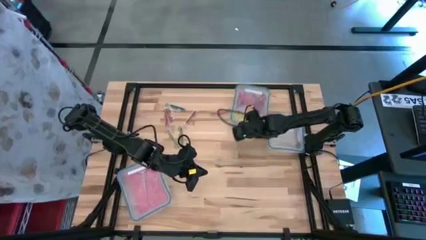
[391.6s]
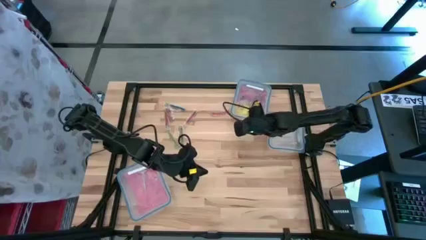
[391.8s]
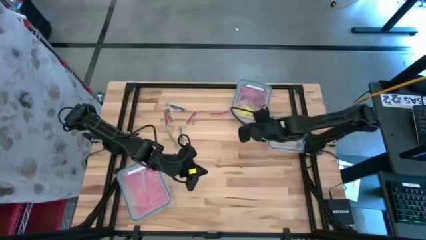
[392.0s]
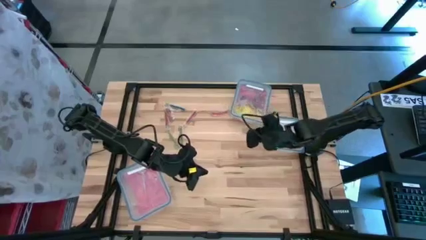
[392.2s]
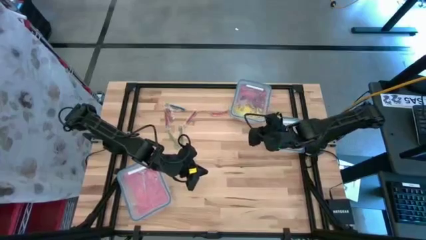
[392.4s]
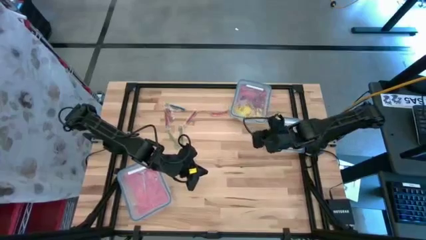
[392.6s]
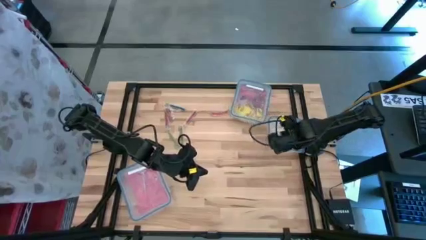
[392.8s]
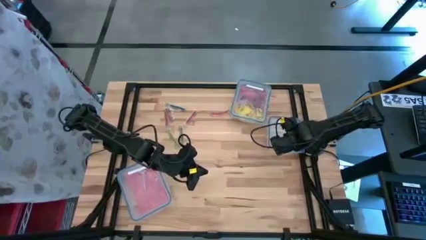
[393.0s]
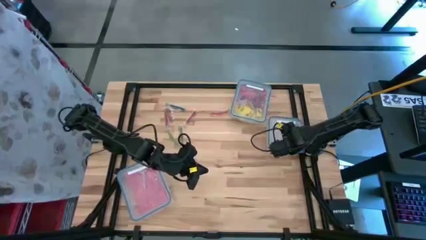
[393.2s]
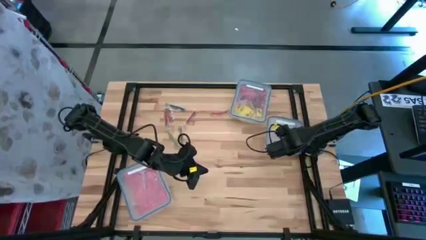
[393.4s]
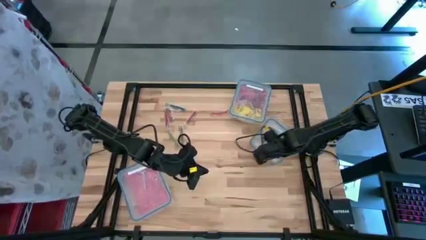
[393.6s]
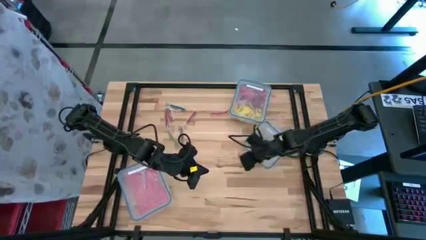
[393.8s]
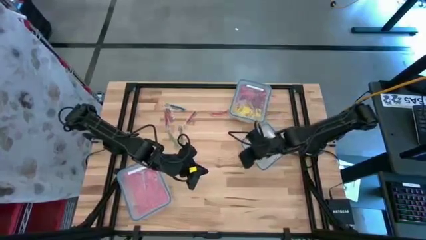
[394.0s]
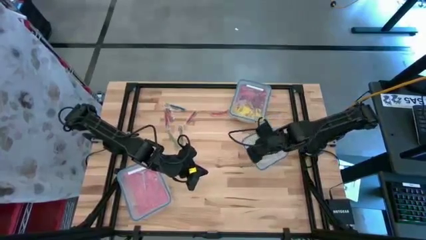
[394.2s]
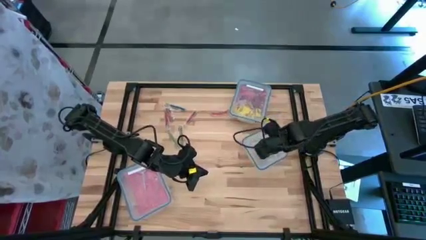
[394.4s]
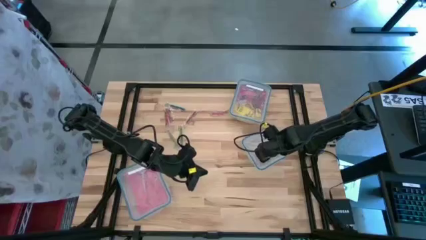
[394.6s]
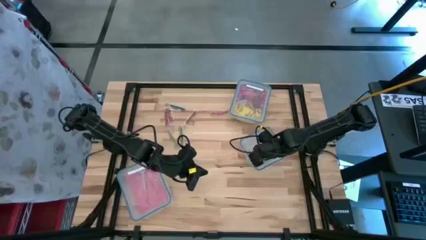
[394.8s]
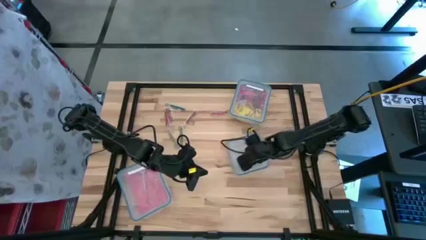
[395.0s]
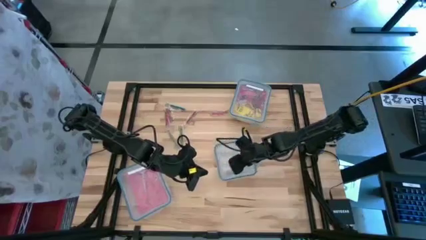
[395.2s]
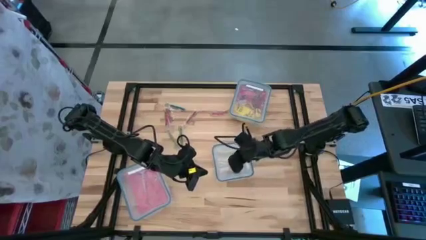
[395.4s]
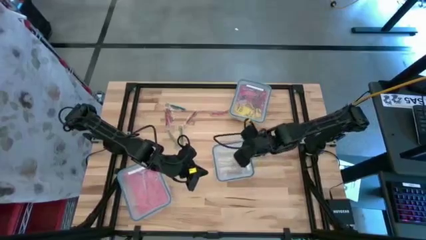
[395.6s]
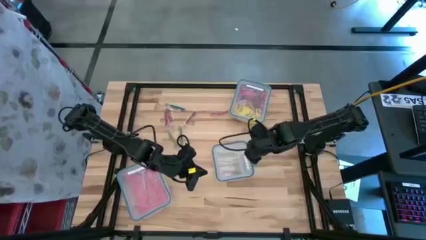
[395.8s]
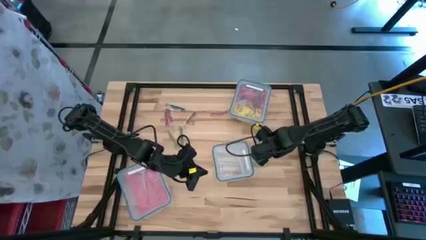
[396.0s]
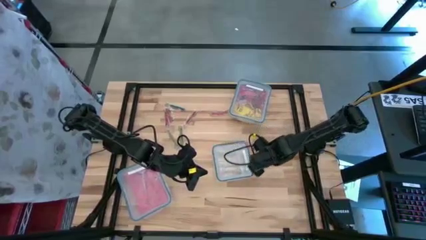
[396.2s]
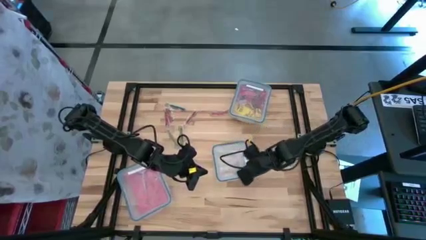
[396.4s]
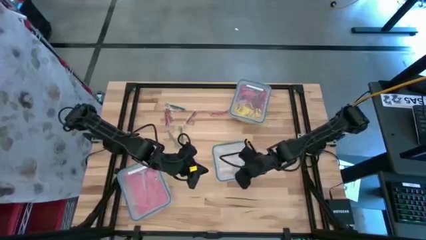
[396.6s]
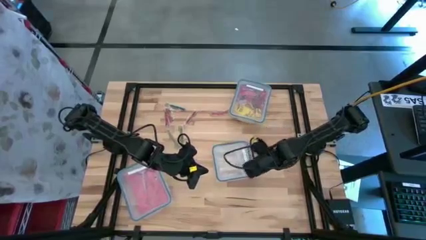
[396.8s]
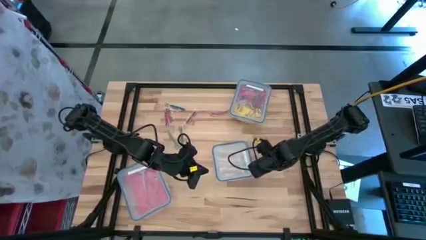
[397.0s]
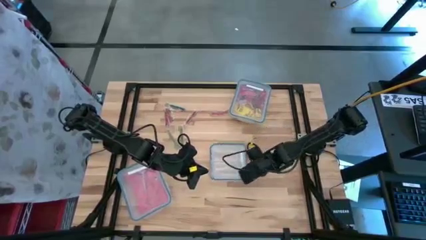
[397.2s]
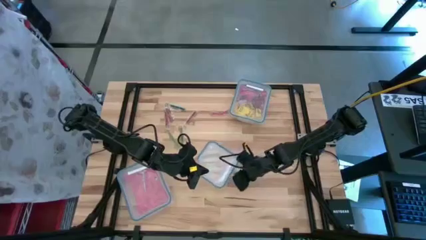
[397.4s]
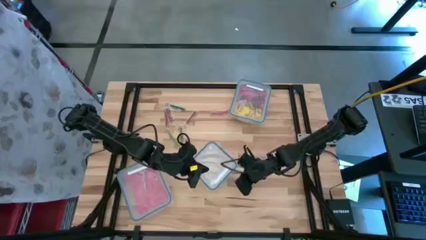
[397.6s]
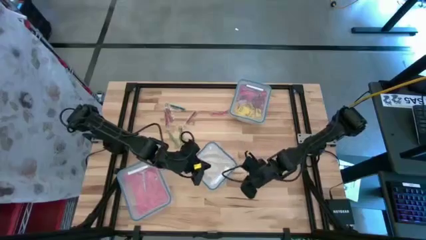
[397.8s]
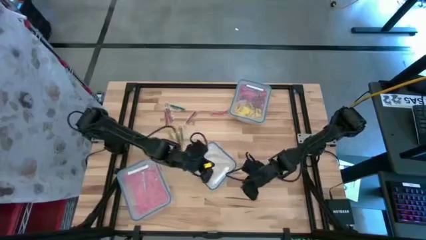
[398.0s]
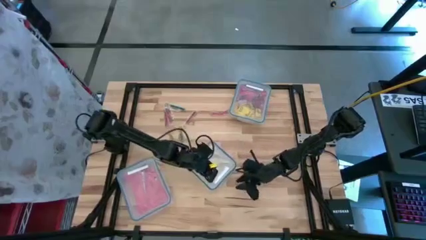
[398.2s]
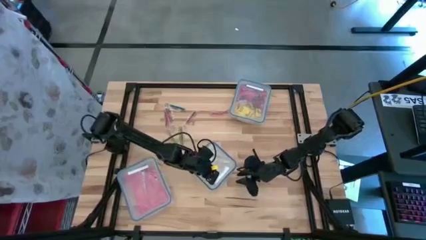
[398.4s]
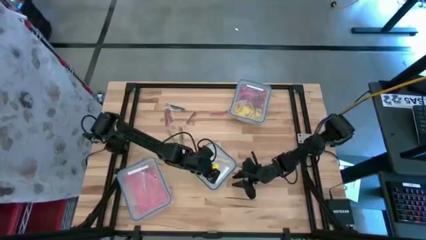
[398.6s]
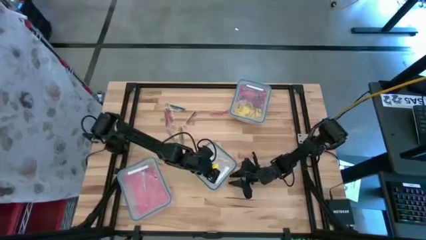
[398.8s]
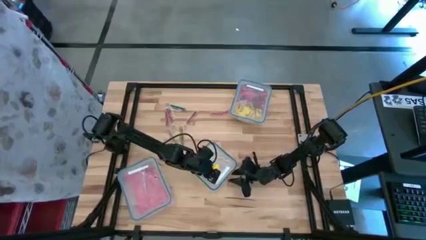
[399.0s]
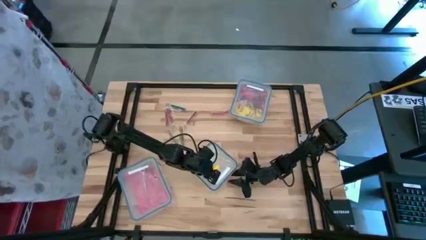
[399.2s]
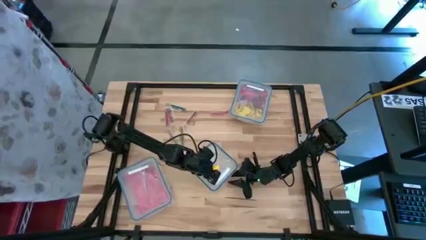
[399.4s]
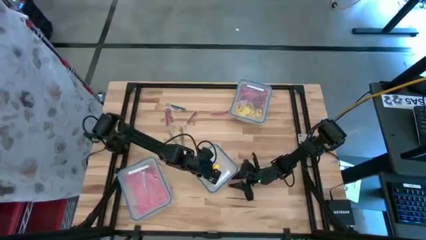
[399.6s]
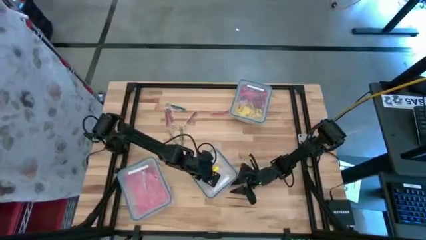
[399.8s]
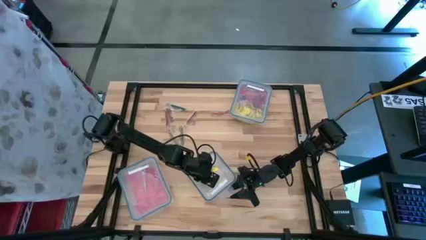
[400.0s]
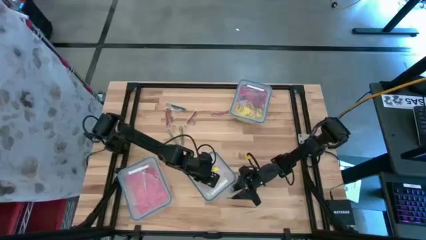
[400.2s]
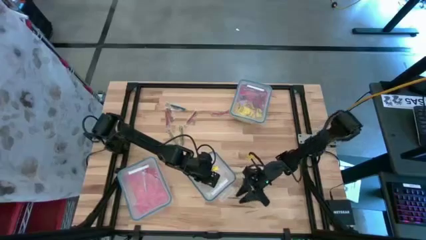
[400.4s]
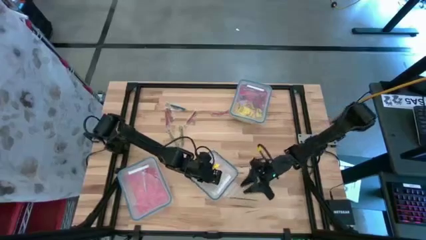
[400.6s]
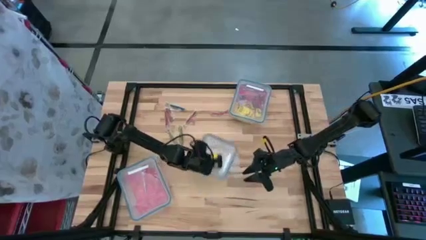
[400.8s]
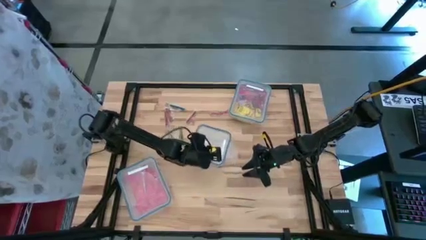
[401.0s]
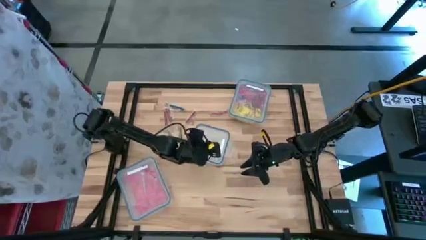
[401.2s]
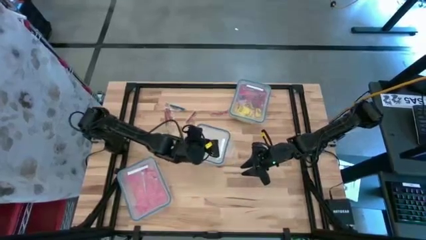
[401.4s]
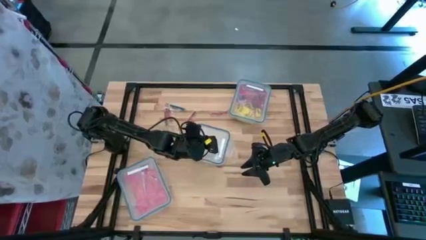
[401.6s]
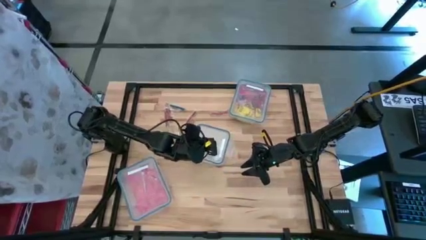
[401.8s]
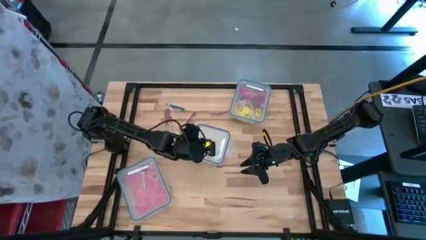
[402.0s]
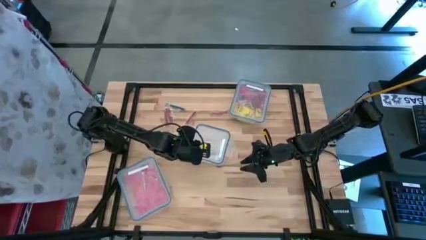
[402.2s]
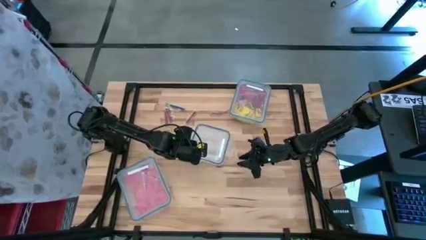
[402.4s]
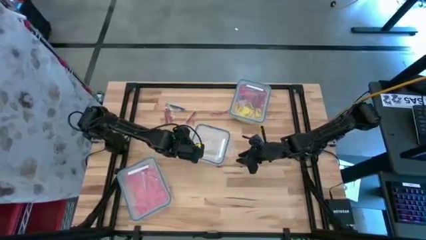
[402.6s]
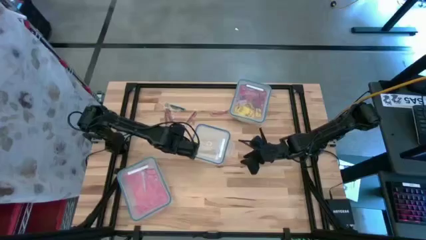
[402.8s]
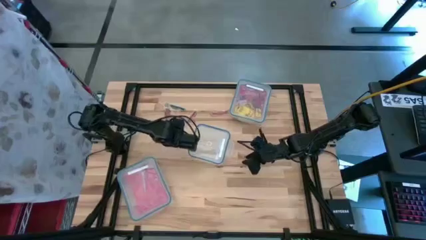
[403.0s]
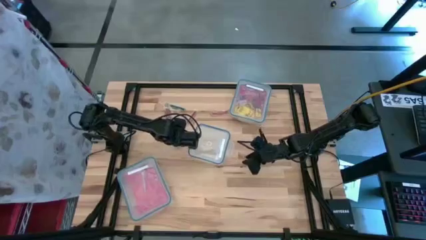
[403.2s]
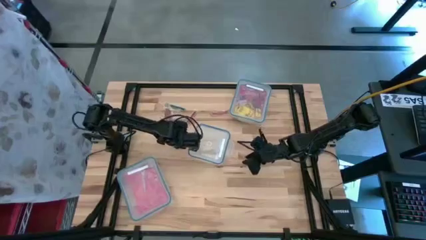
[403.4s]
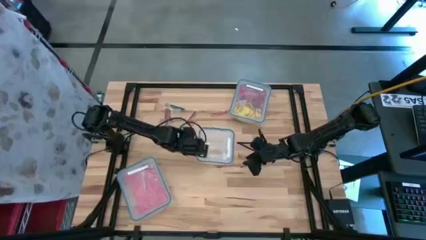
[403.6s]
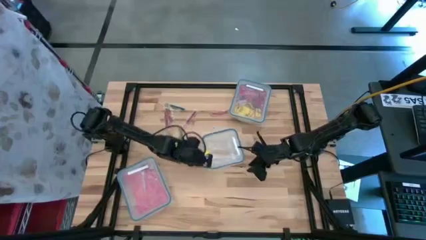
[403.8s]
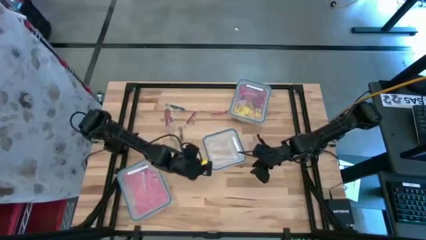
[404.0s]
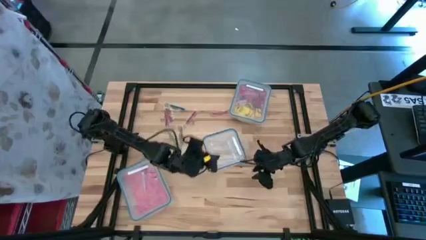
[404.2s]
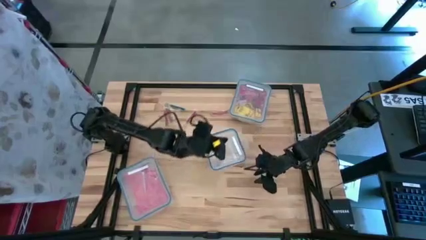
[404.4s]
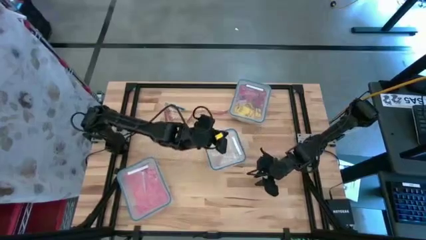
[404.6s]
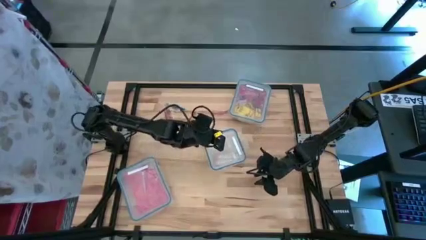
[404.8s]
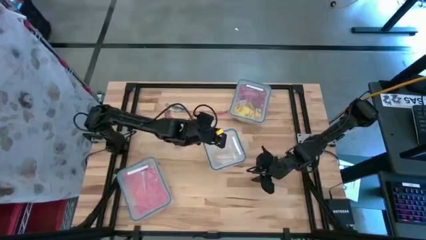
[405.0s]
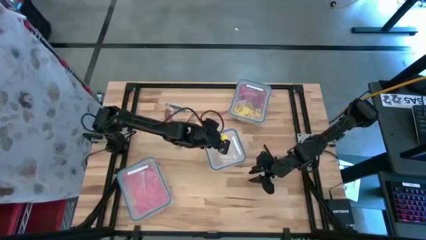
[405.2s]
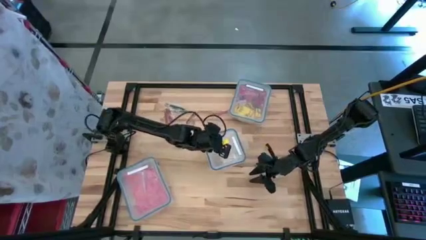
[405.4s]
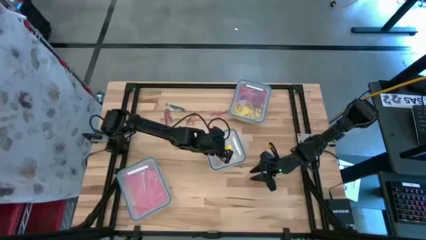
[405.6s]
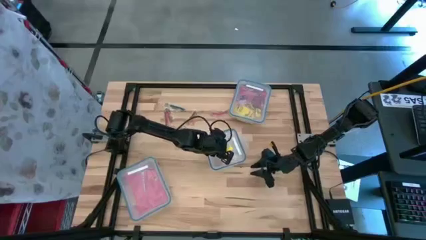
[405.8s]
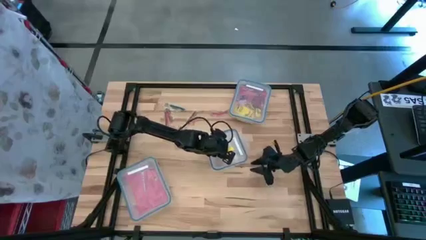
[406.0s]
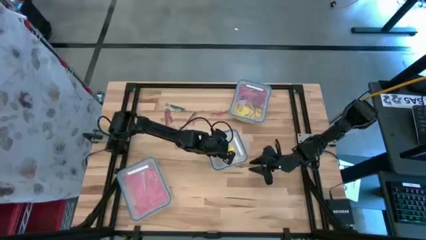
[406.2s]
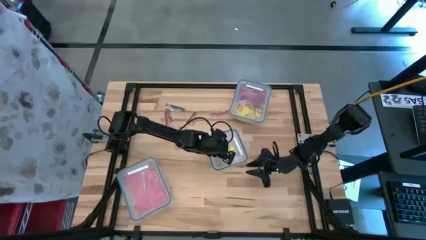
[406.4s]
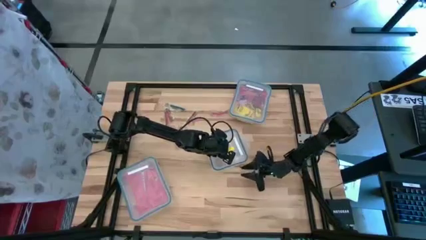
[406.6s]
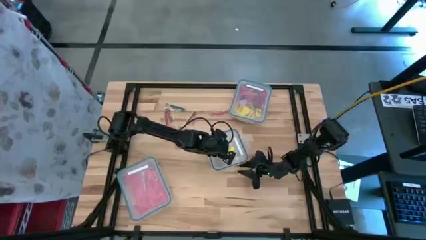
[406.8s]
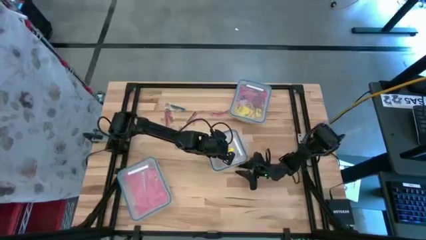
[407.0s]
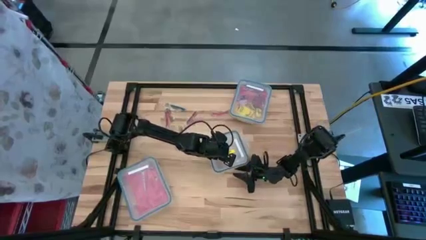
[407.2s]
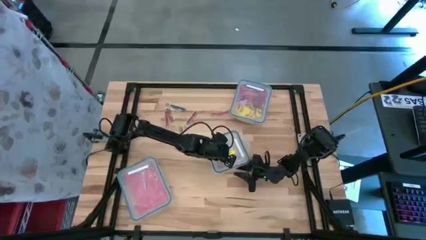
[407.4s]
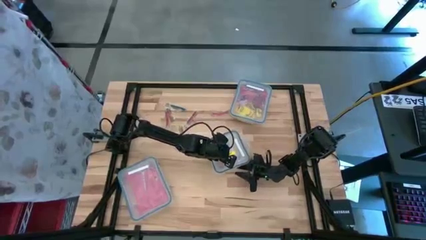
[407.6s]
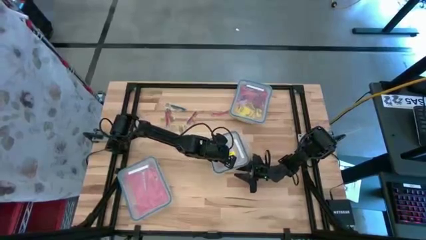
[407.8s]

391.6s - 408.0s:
Task: Sort candy
Open the square transparent bin

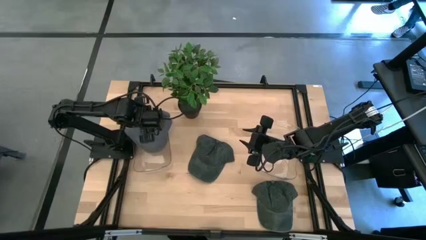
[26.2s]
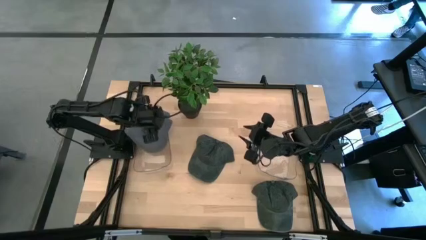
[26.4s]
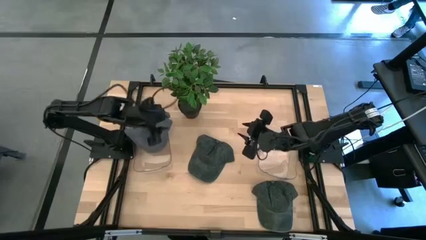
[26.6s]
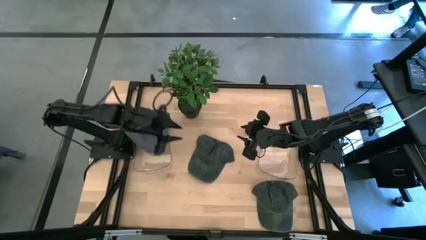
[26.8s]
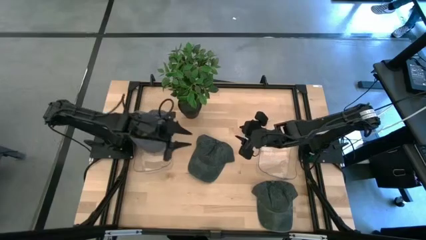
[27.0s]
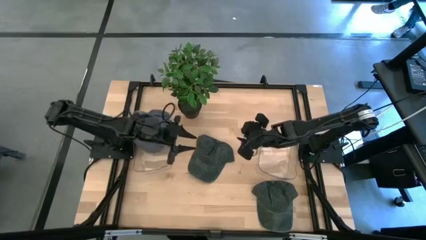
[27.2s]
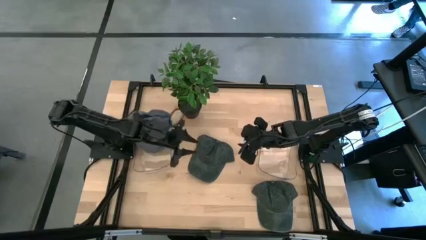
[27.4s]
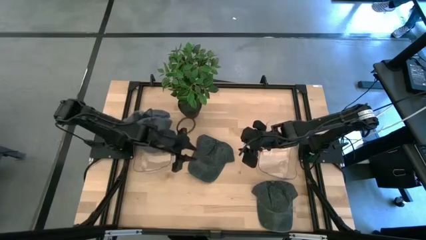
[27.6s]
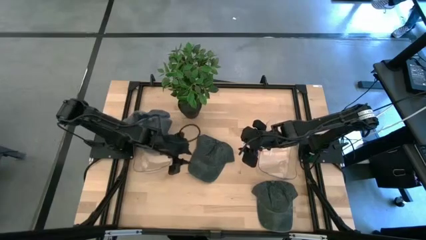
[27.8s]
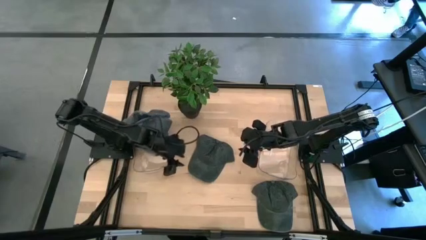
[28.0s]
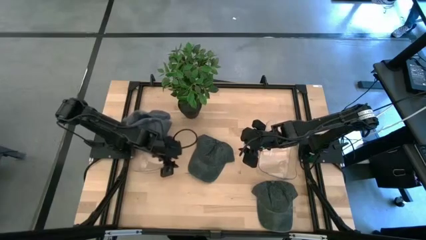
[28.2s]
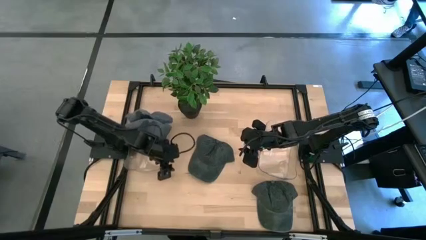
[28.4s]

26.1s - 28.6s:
Task: Pick & Place hat
Adjust the left transparent bin
